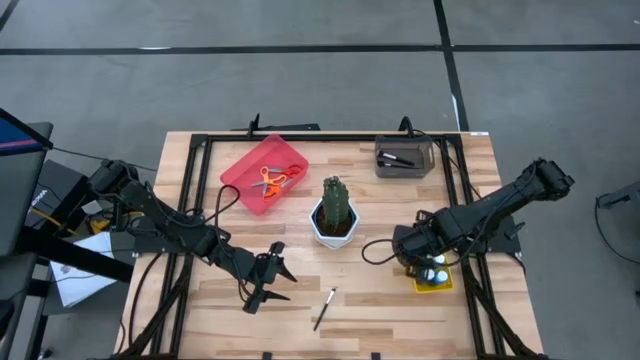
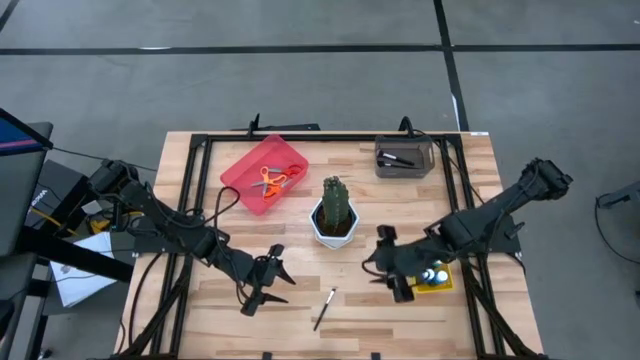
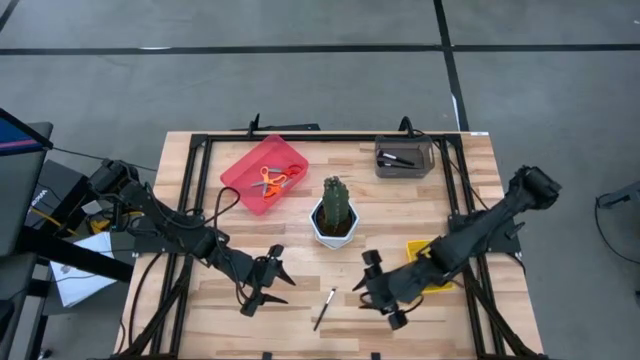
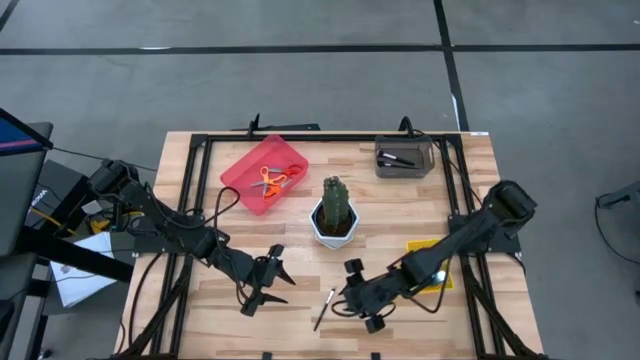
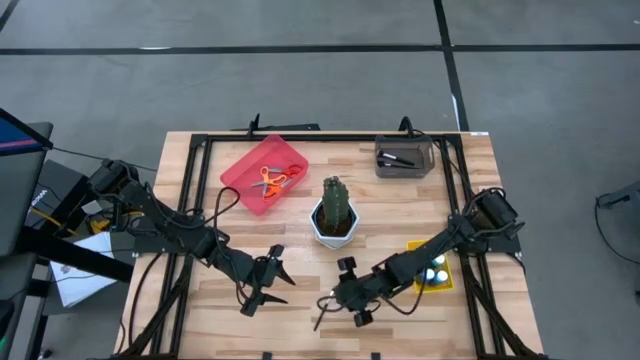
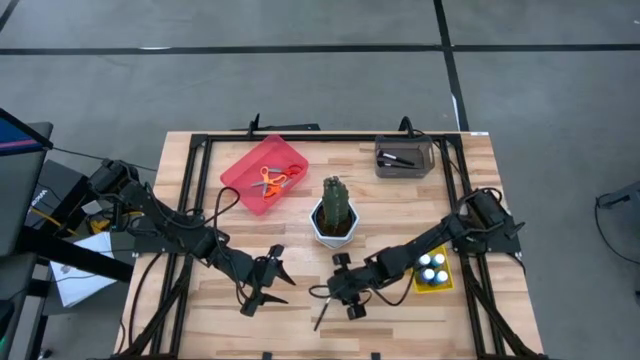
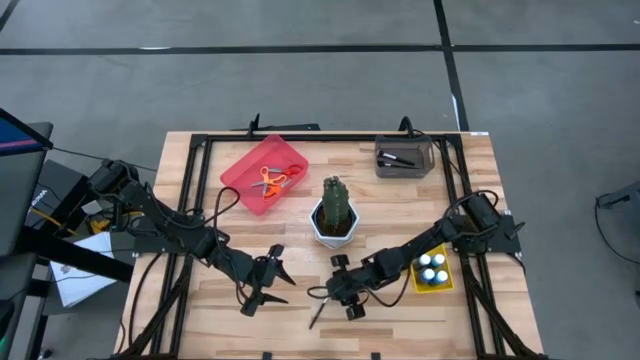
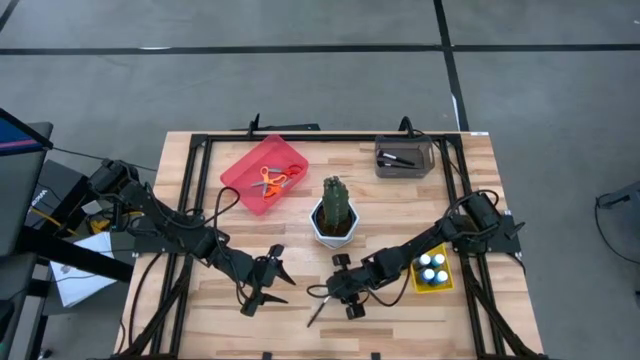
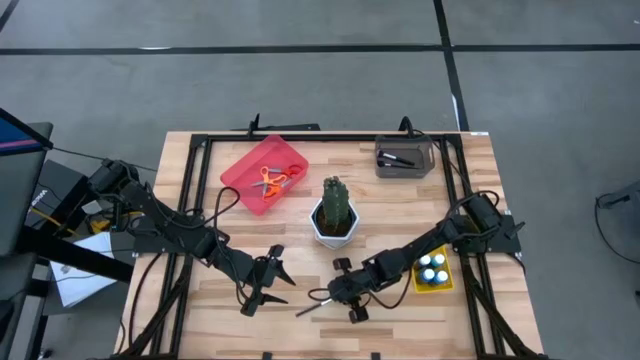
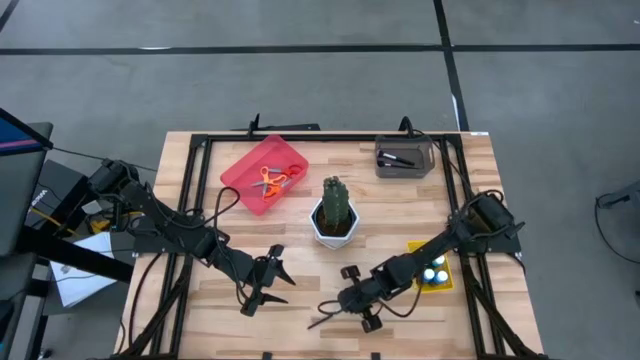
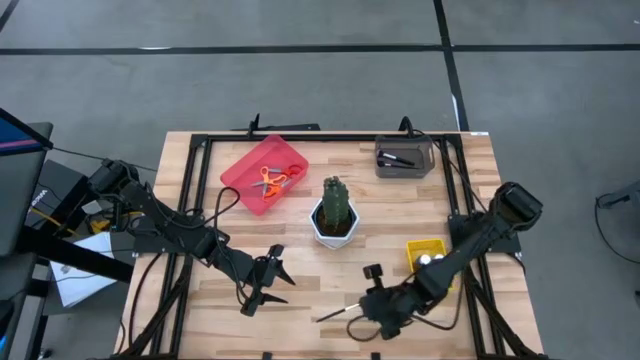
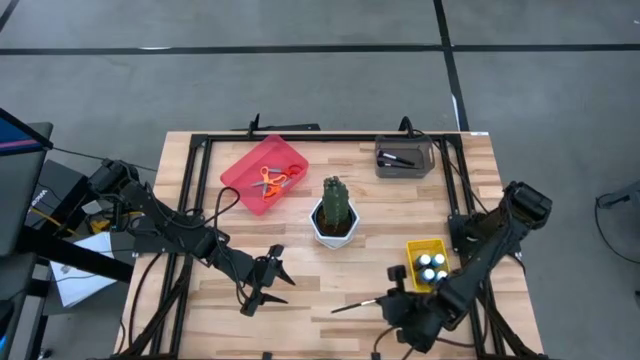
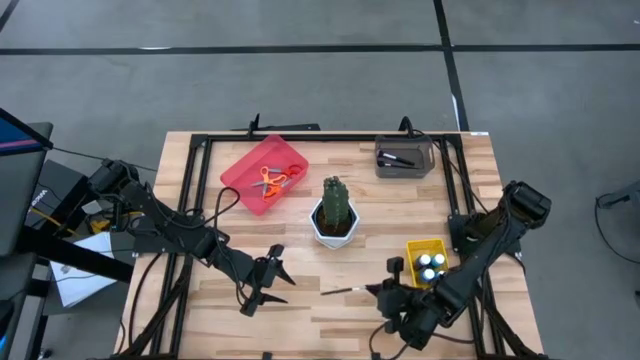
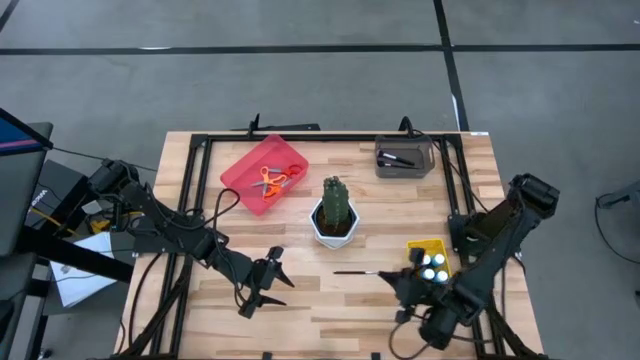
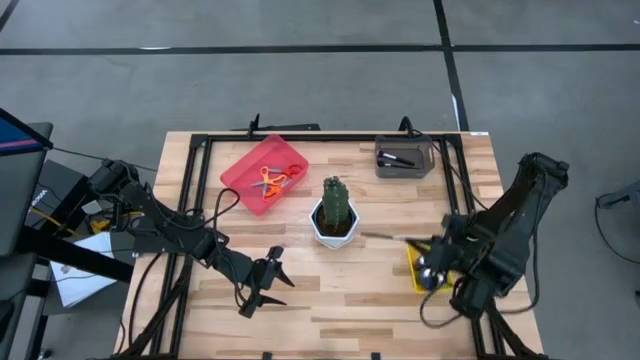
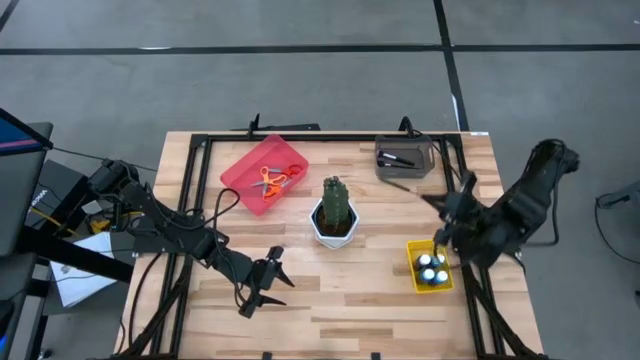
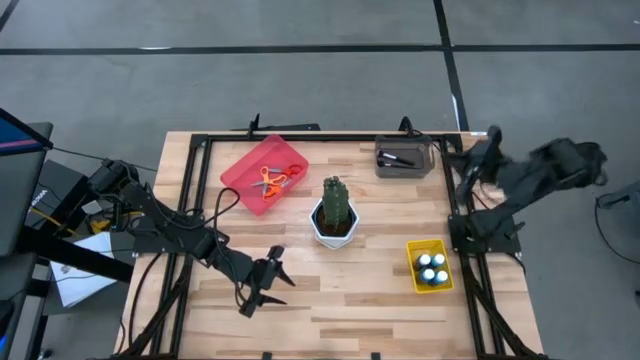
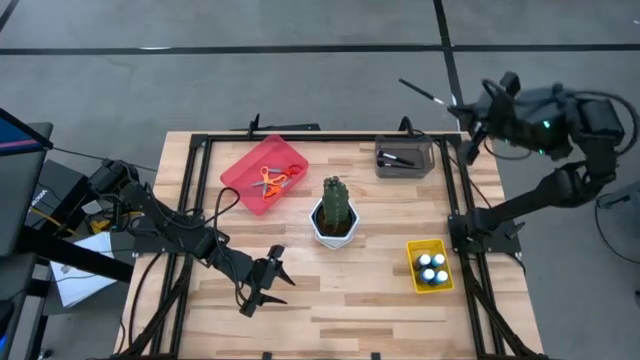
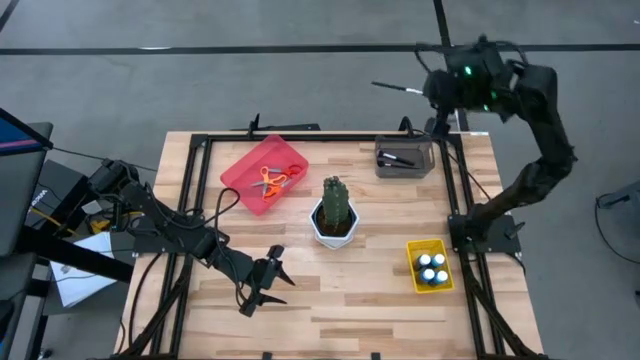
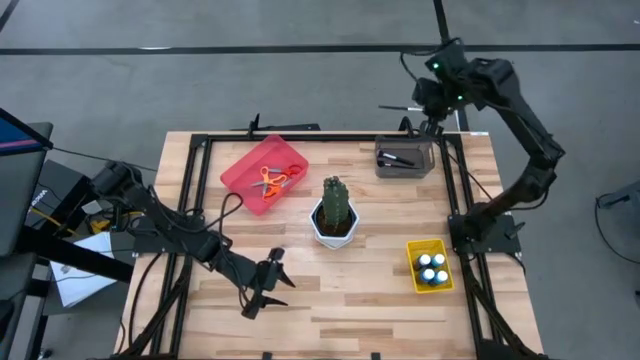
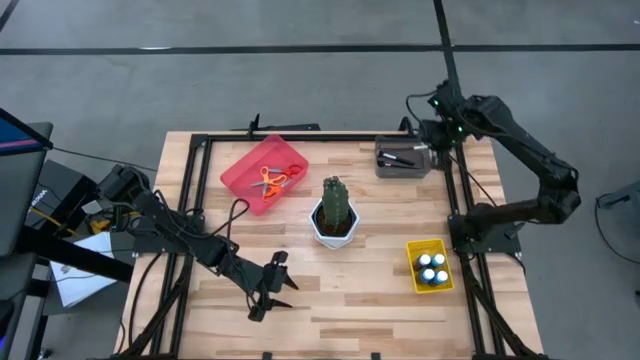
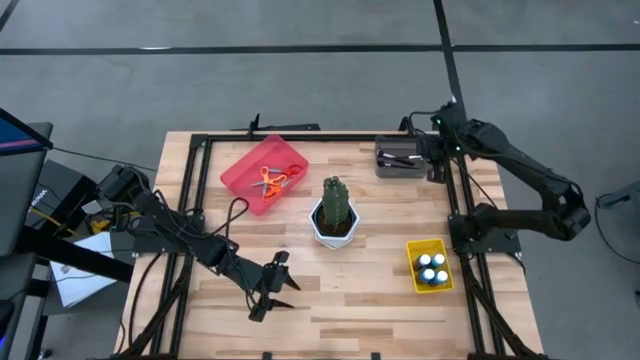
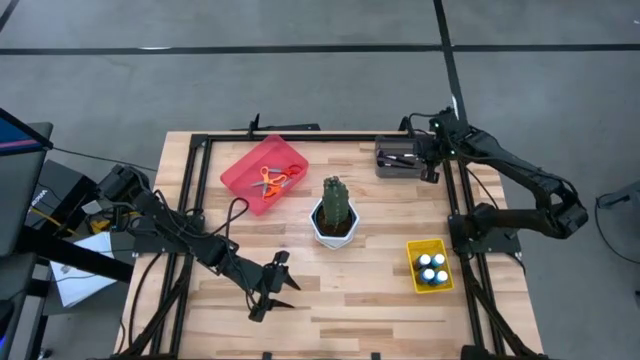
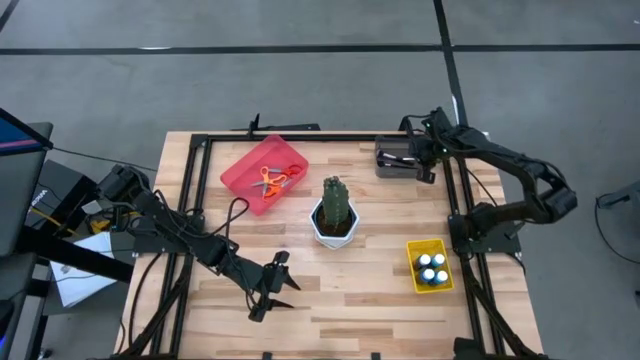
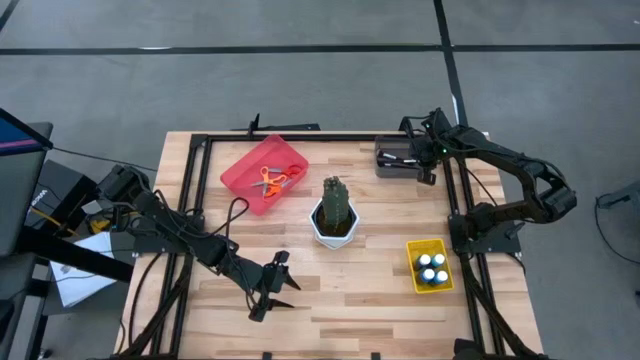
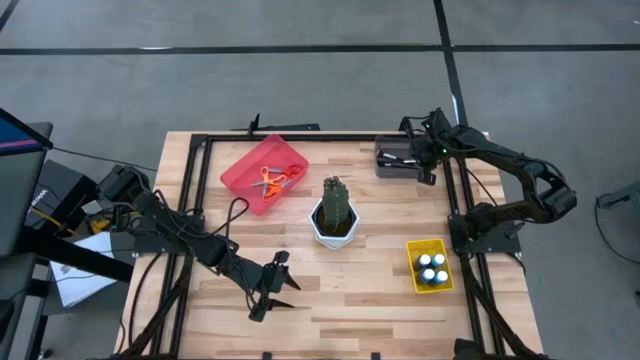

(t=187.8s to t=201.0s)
Task: Pick & Place Paint Supplies
Put the foundation brush into the black bin

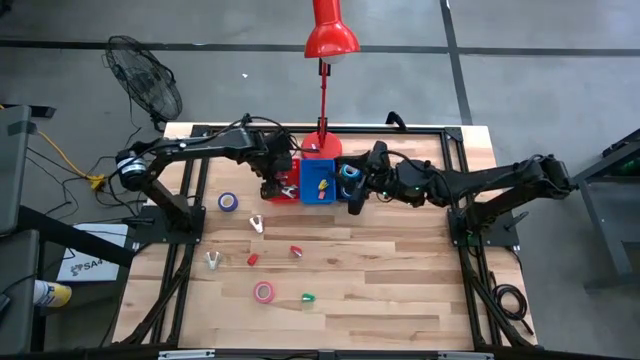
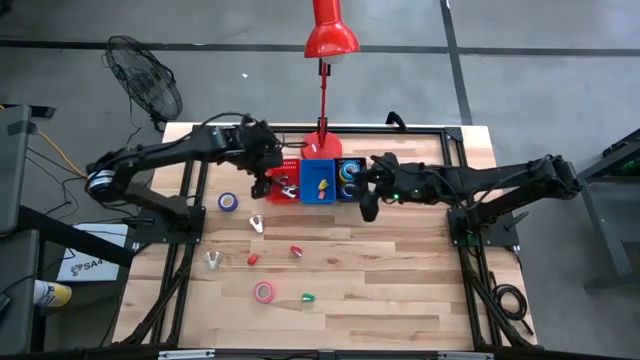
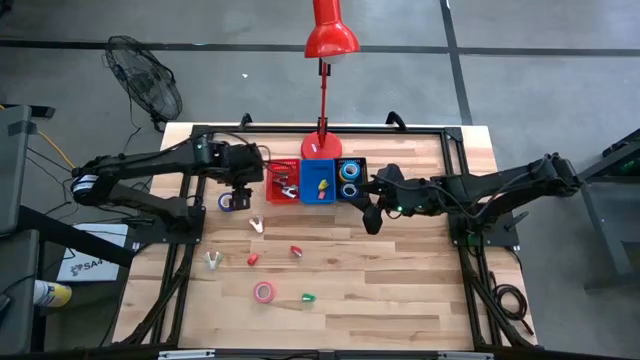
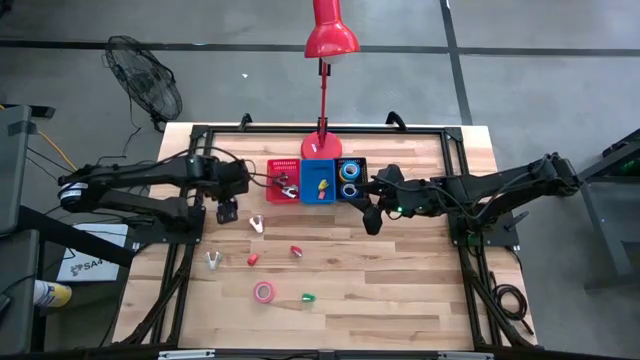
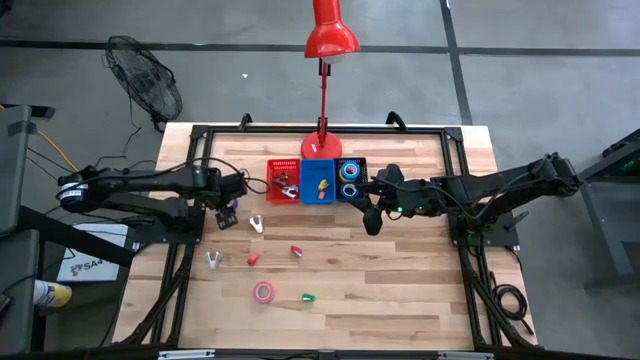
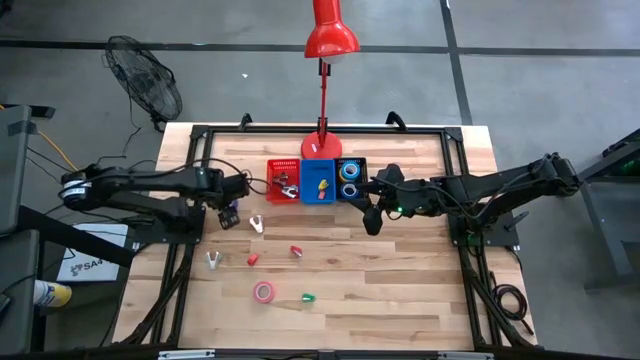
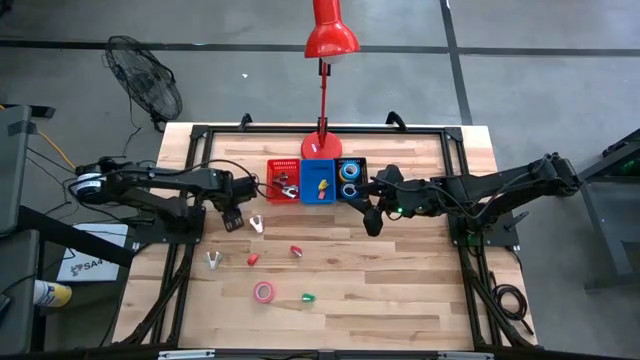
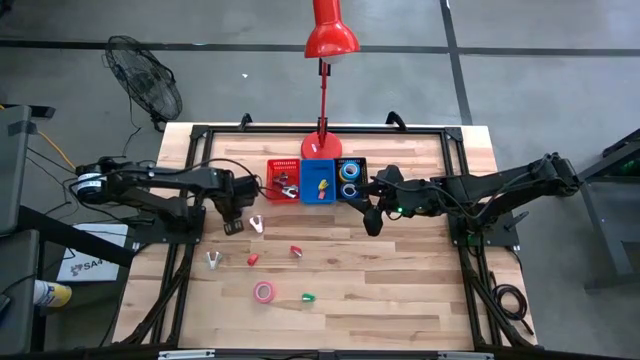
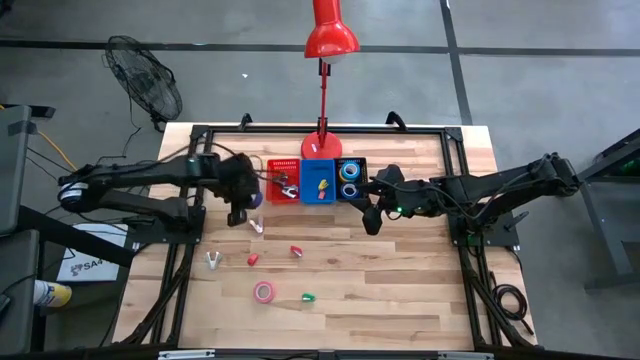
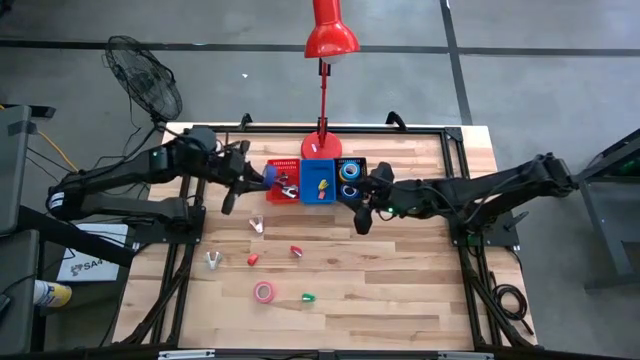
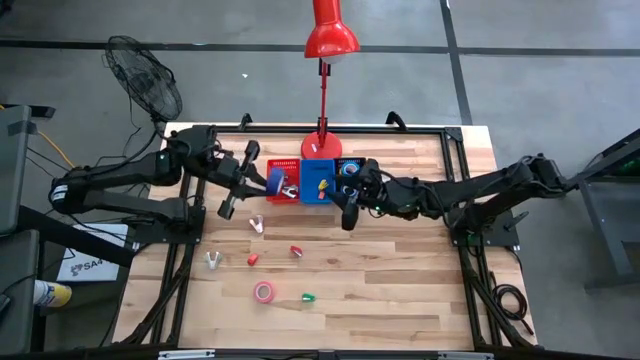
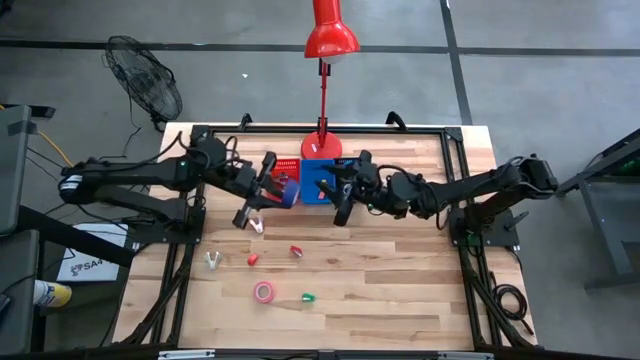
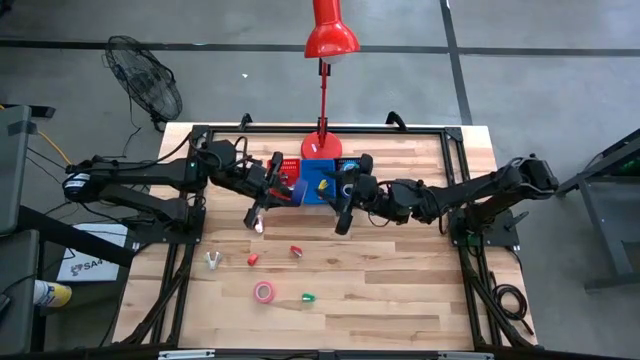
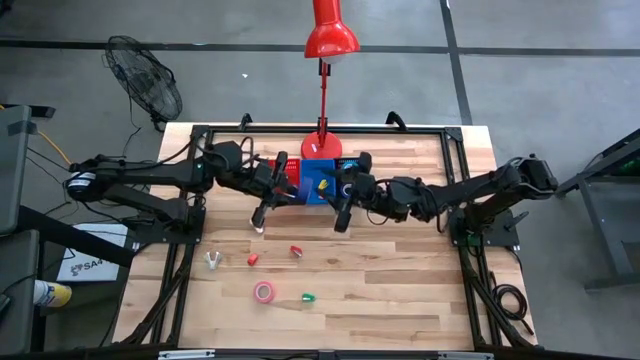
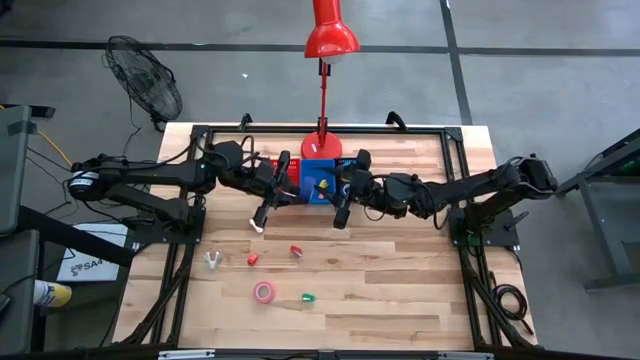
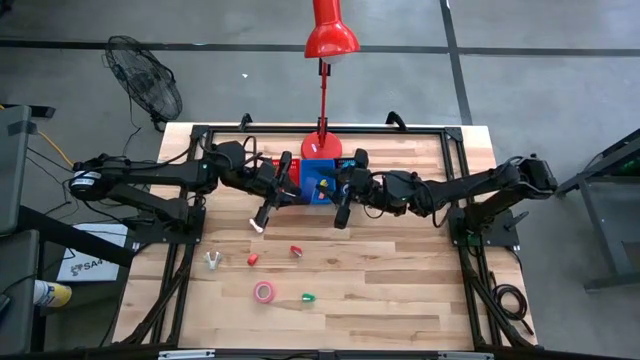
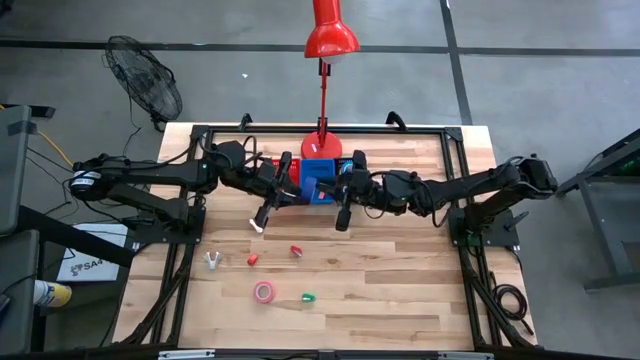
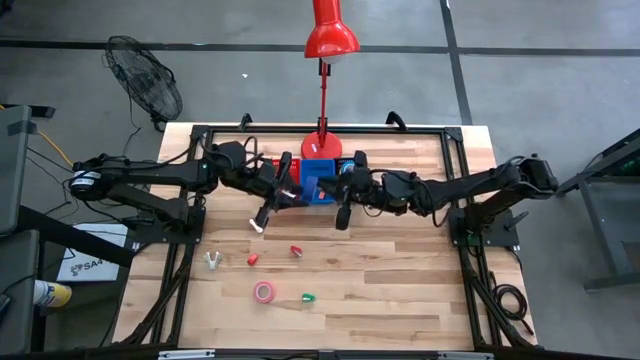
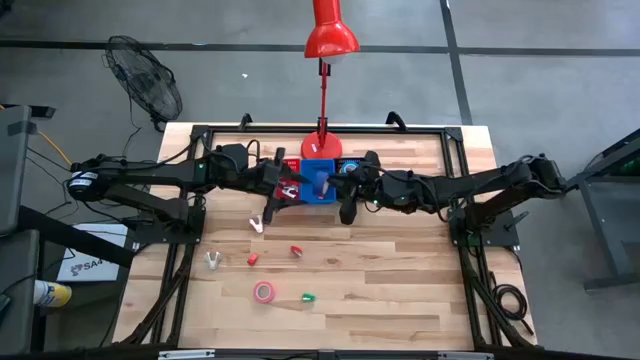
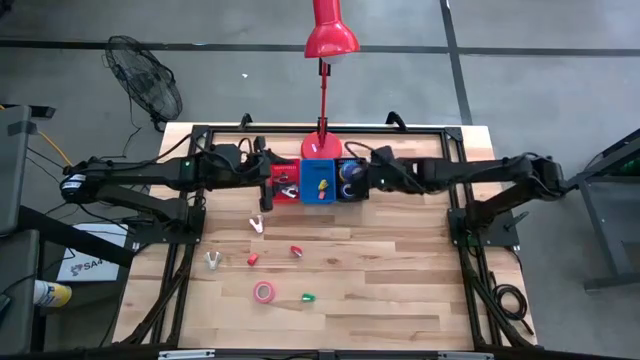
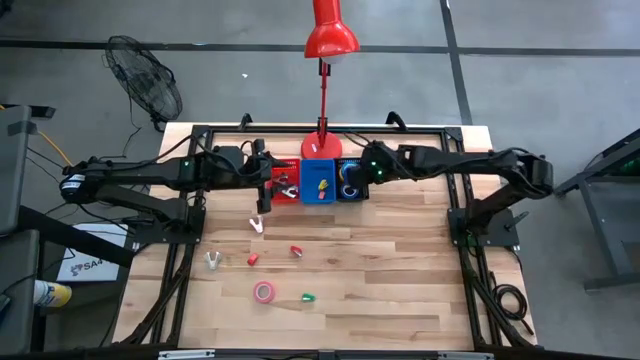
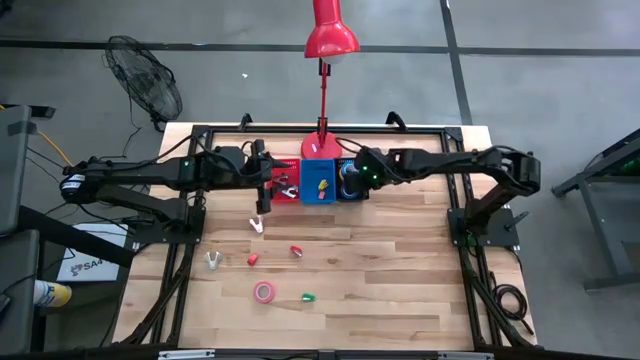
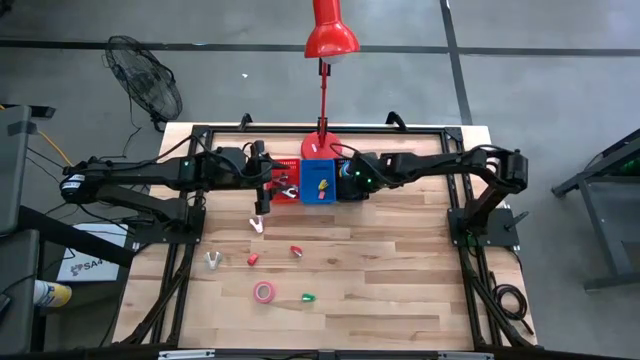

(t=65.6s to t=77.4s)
Task: Pick and place Stapler, Stapler remover, tape
Put the violet tape into the black basket
